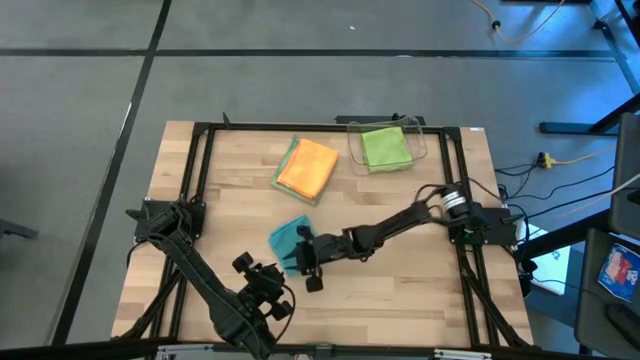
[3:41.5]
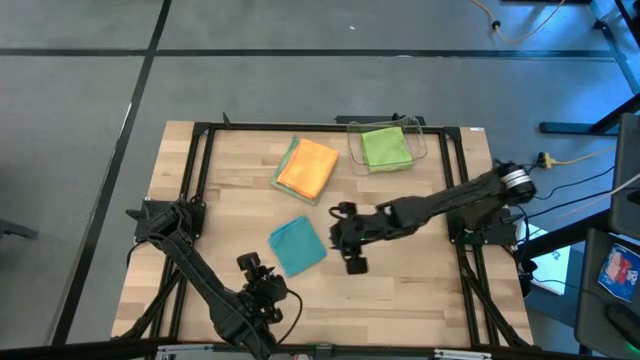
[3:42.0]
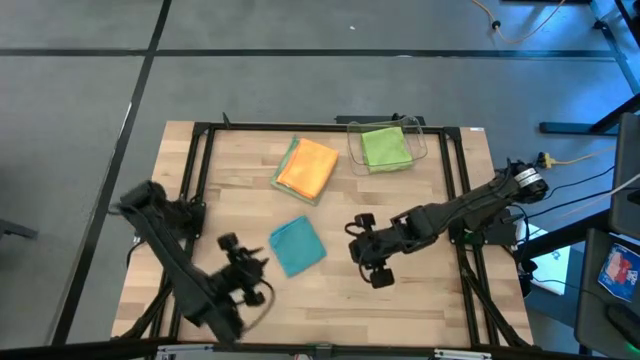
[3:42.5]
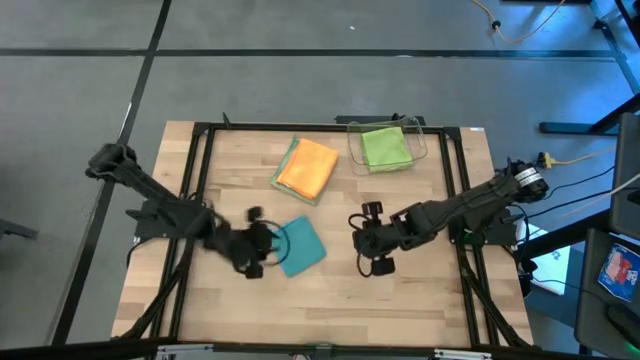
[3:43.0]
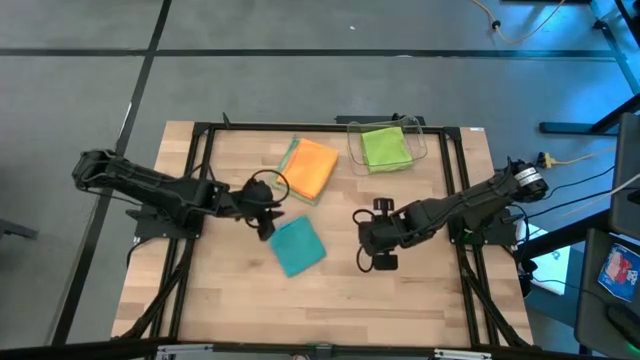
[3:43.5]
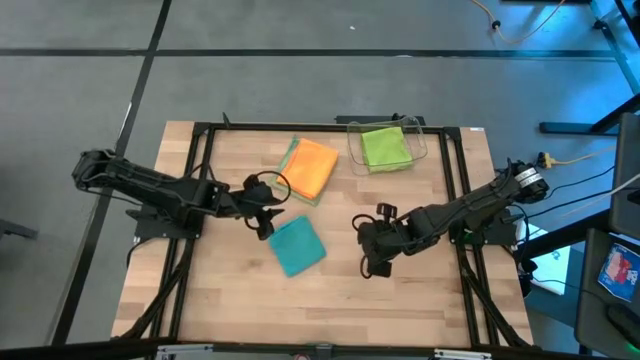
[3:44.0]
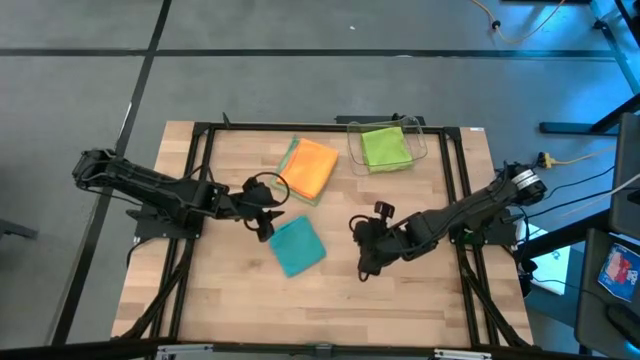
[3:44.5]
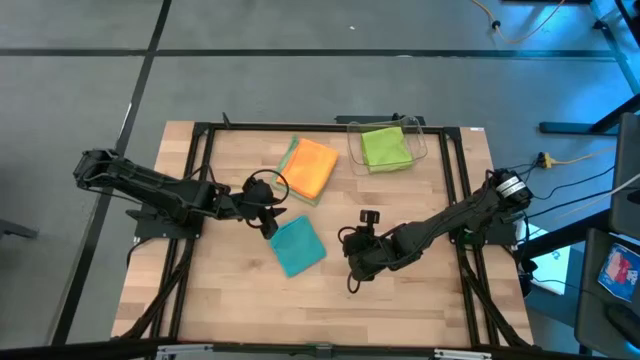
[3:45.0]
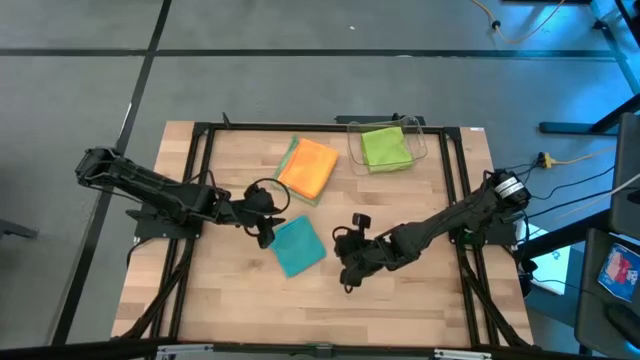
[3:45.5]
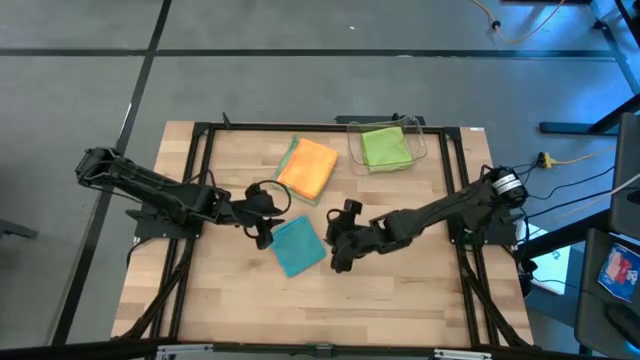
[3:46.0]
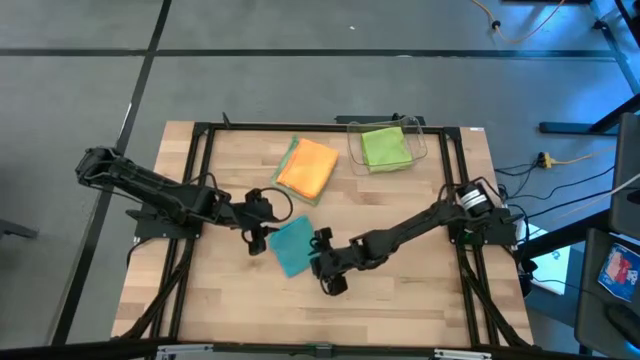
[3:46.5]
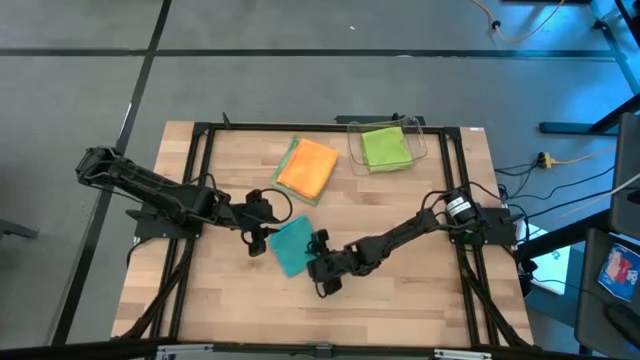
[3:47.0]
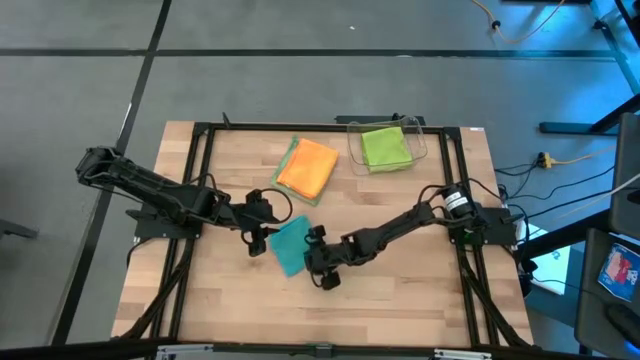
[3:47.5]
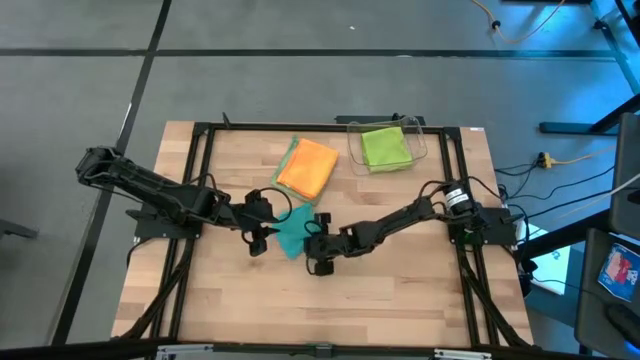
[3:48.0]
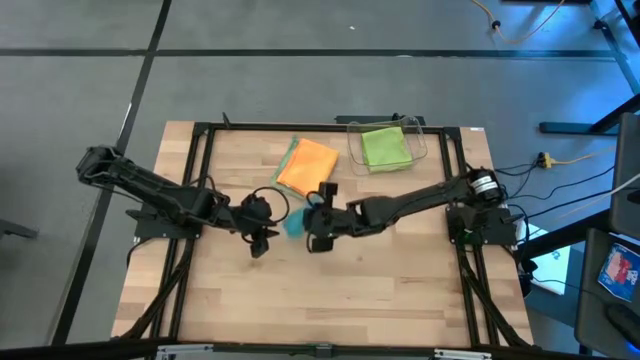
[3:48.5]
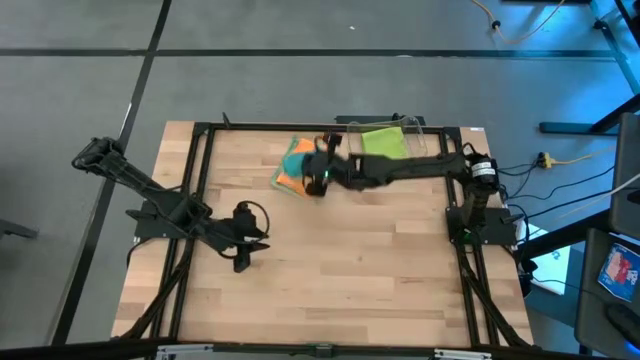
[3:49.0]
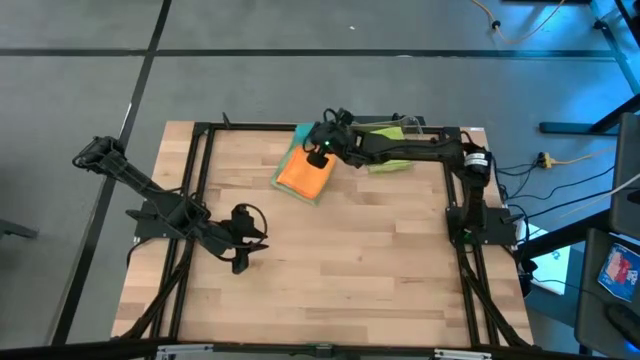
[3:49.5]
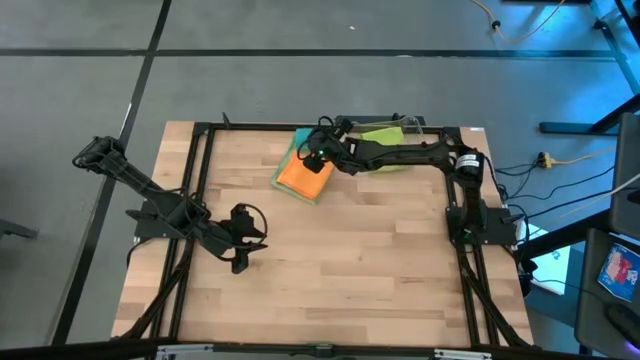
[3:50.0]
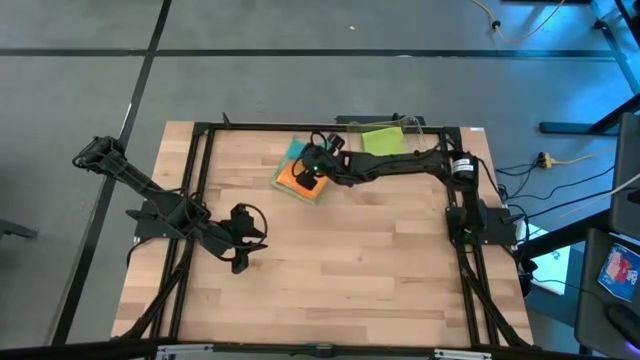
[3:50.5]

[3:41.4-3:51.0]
Task: Fold microfiber towels
Stack the blue microfiber towel on the orange microfiber towel

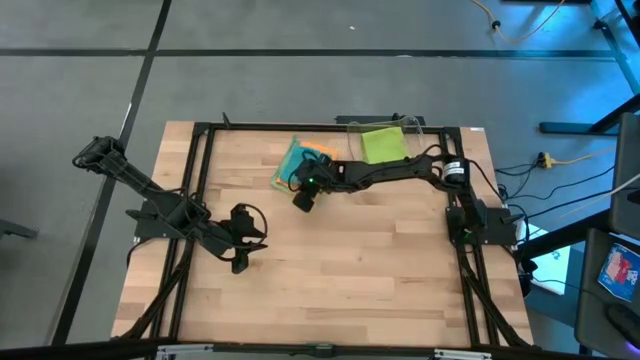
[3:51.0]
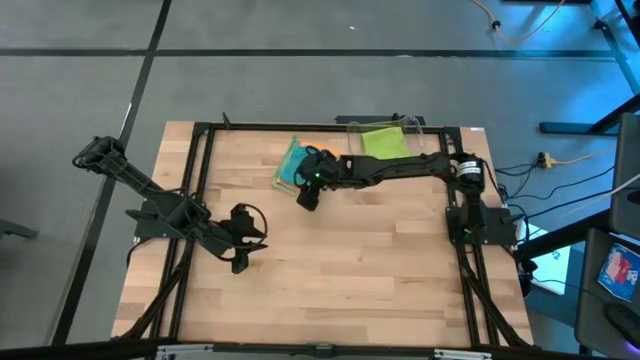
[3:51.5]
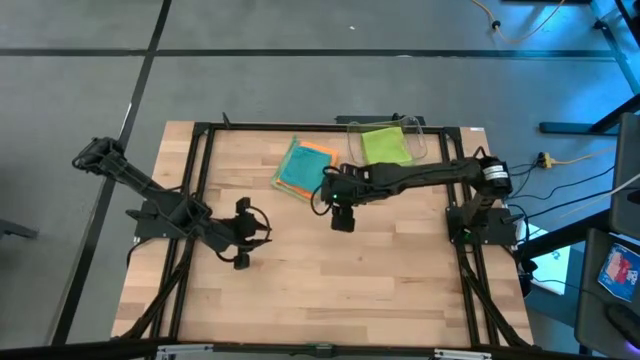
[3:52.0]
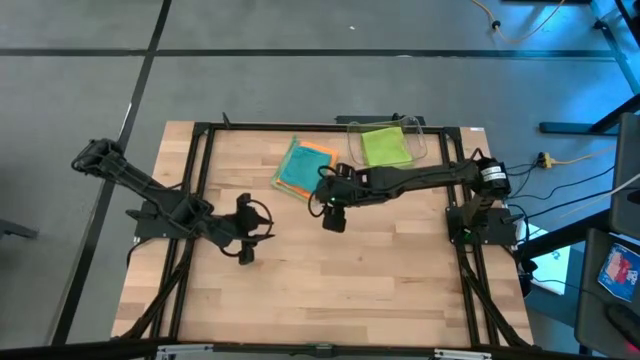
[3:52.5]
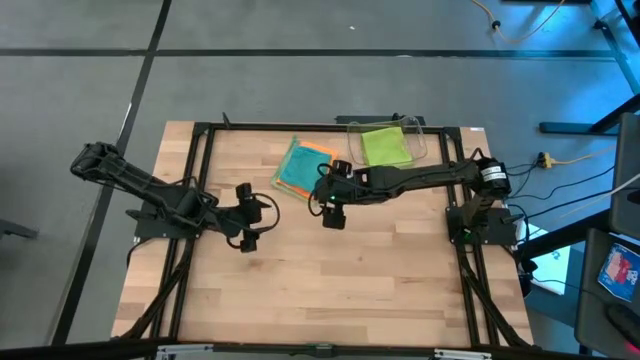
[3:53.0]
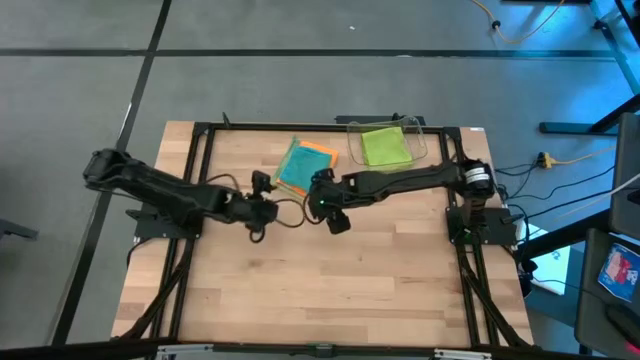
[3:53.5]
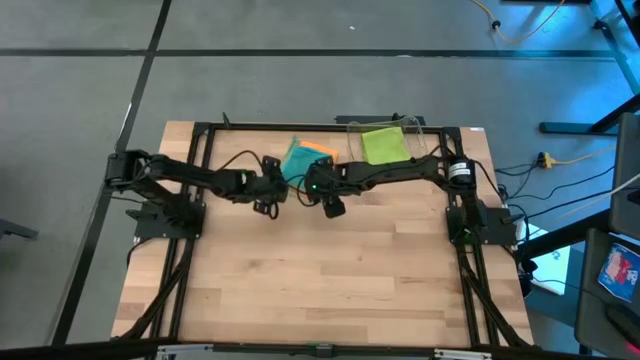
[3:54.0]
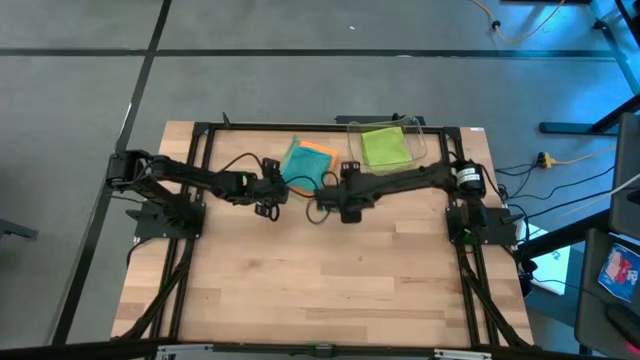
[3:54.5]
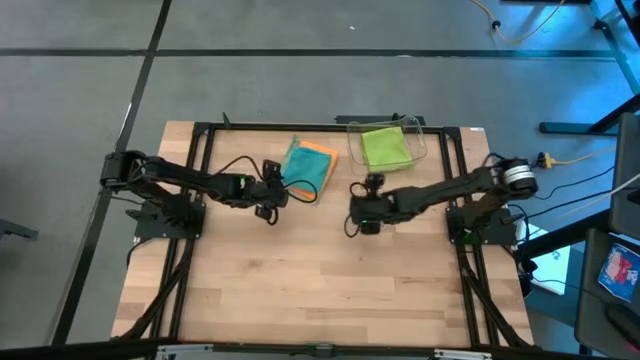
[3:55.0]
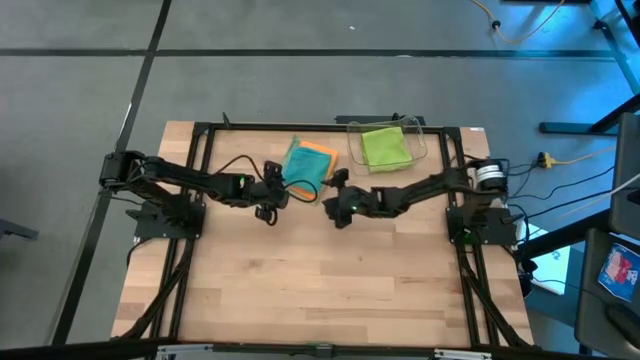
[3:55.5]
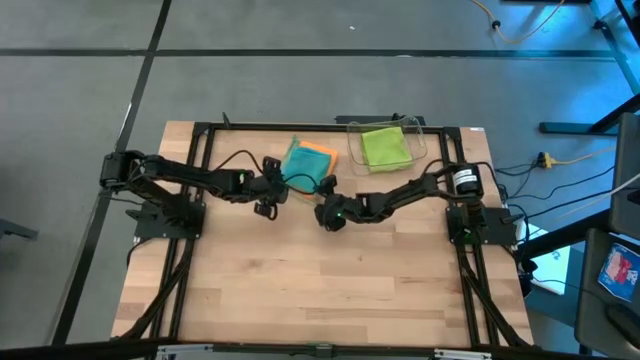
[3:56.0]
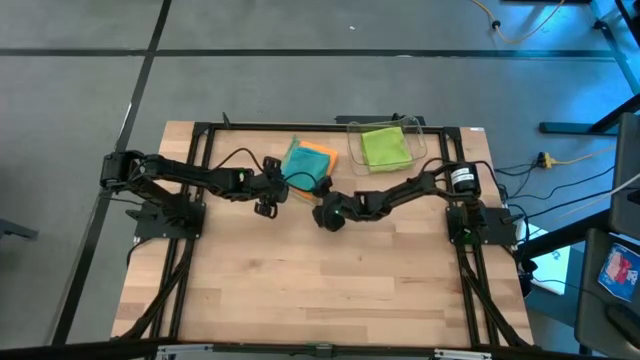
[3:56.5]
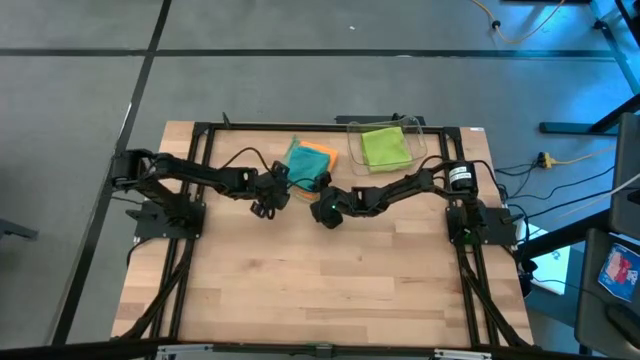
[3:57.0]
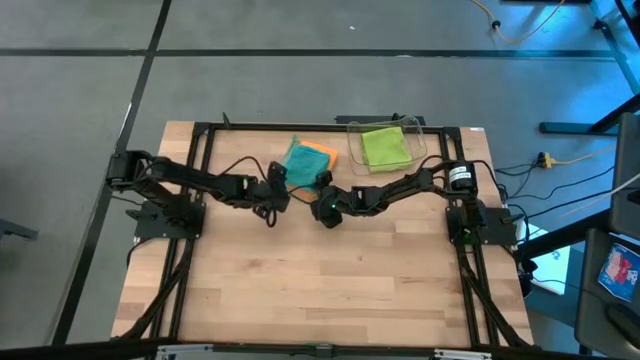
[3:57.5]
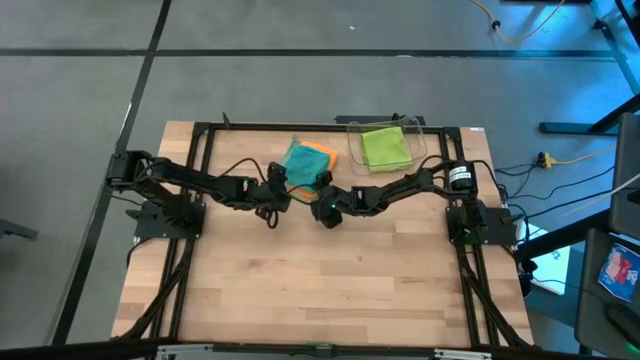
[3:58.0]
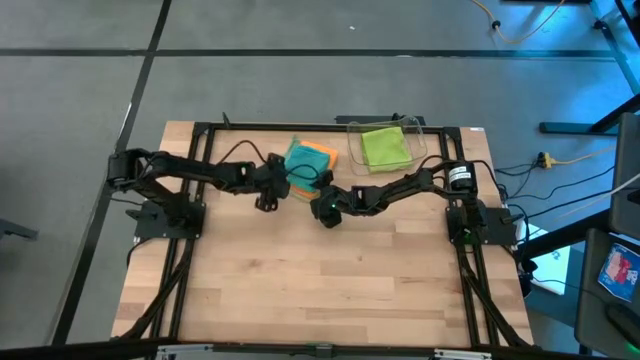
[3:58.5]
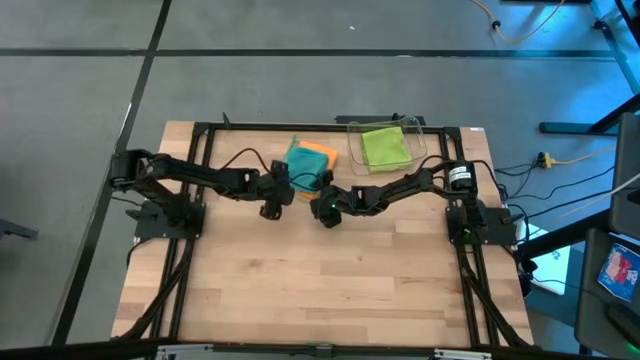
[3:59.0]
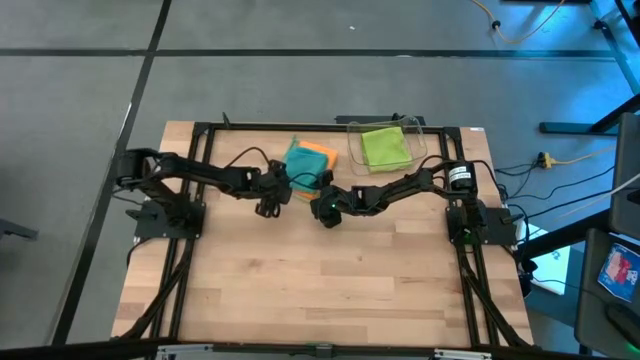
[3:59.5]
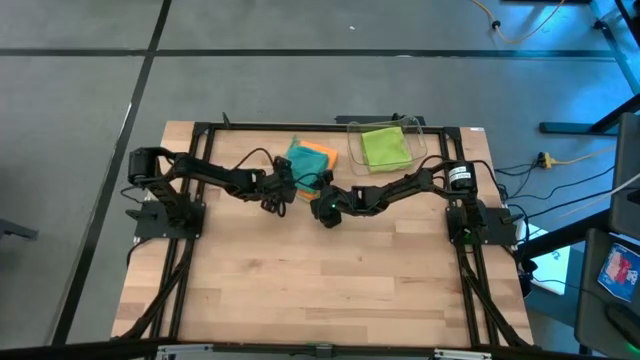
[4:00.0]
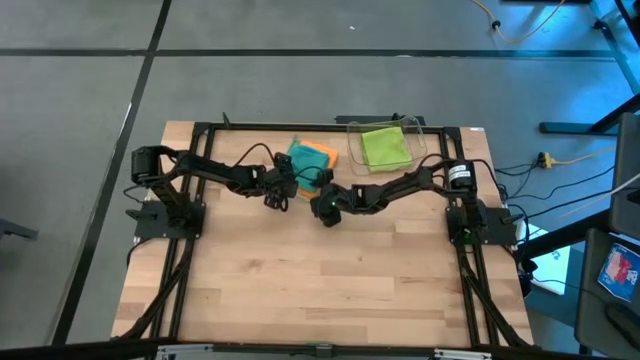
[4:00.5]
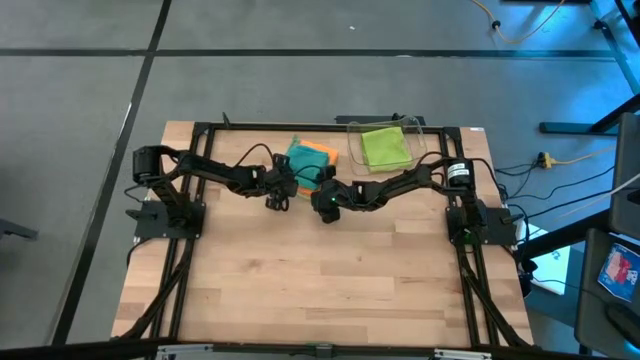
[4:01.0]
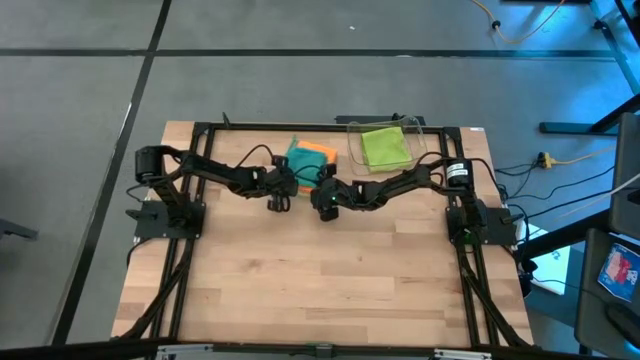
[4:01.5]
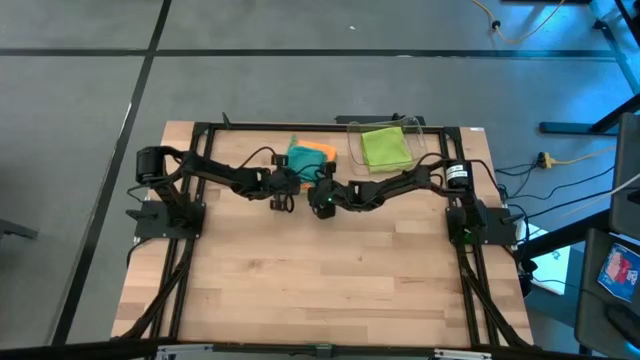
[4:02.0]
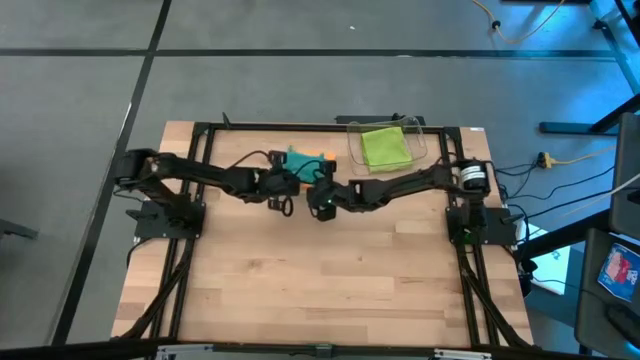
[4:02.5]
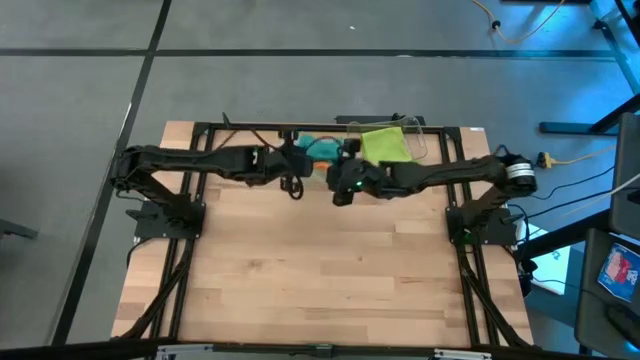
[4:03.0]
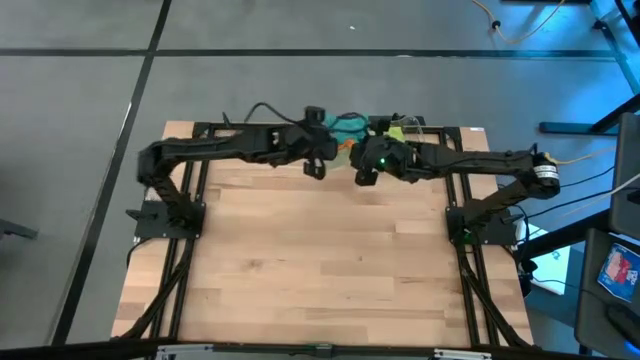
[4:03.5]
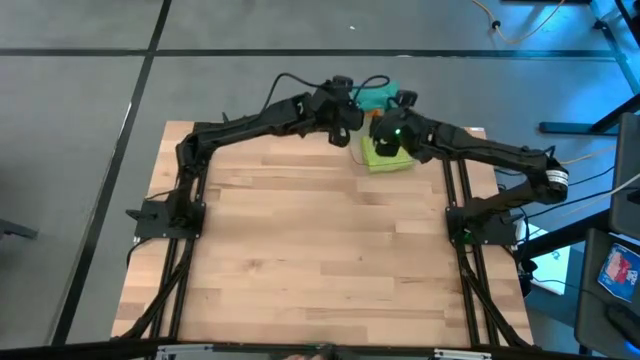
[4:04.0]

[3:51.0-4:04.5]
Put the pile of microfiber towels into the transparent bin
